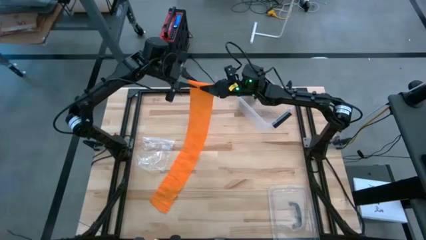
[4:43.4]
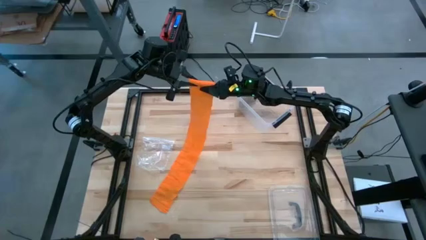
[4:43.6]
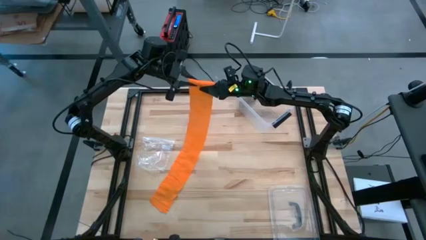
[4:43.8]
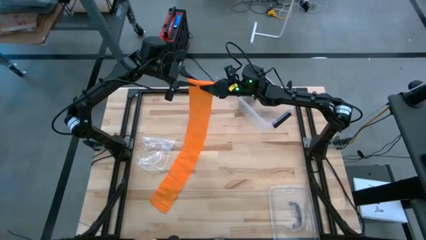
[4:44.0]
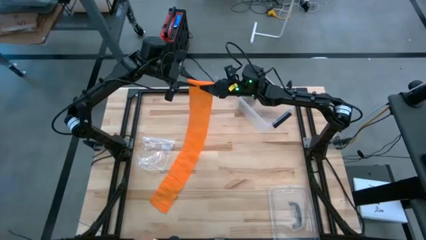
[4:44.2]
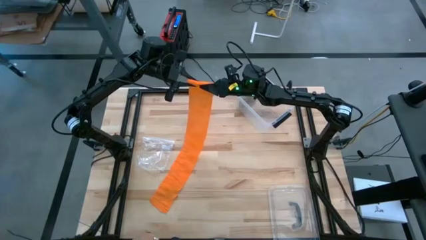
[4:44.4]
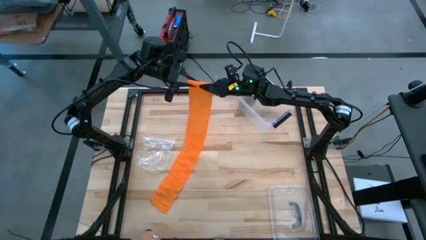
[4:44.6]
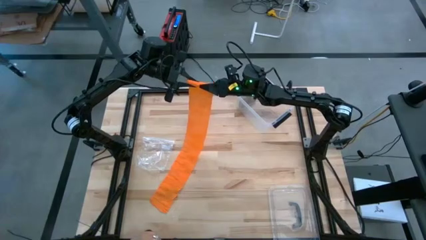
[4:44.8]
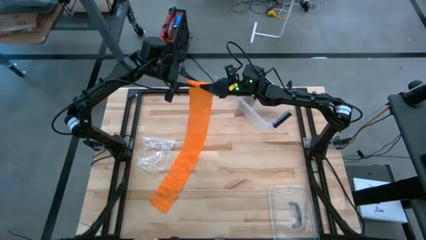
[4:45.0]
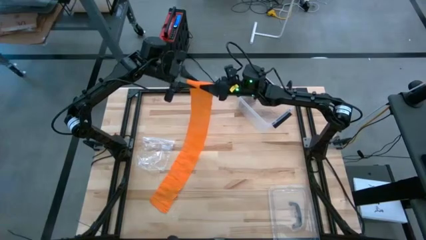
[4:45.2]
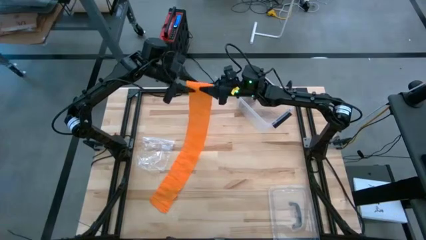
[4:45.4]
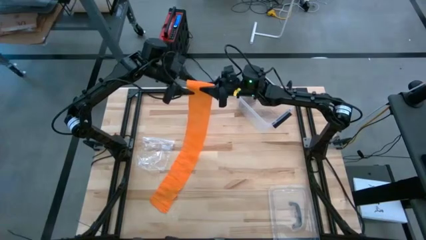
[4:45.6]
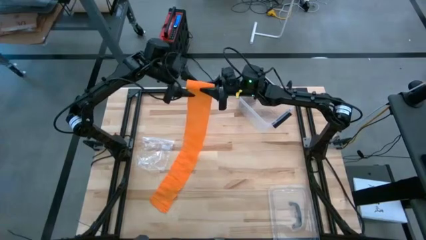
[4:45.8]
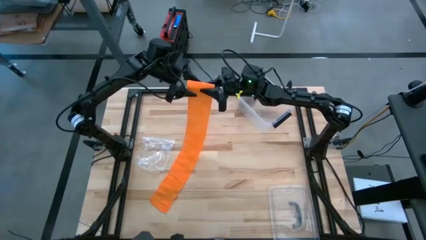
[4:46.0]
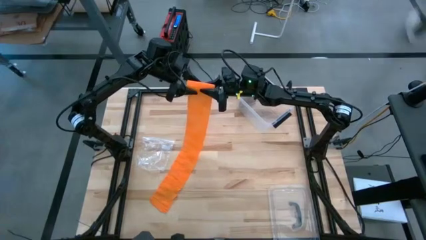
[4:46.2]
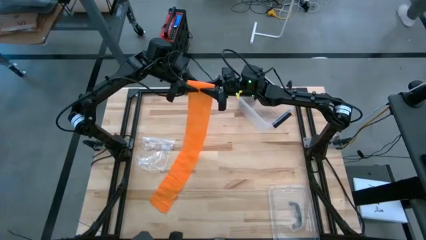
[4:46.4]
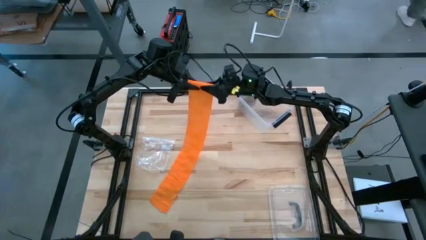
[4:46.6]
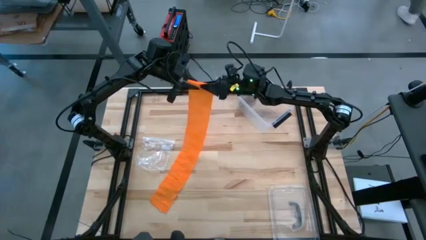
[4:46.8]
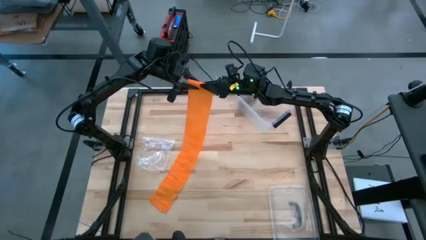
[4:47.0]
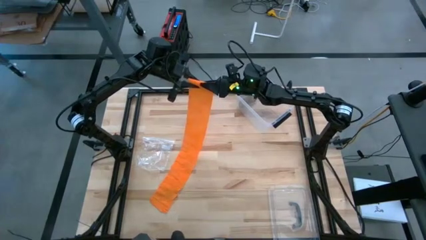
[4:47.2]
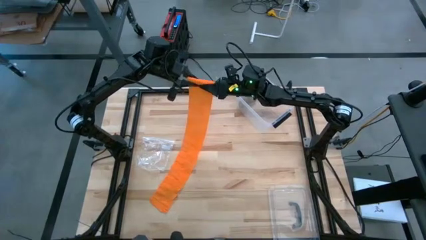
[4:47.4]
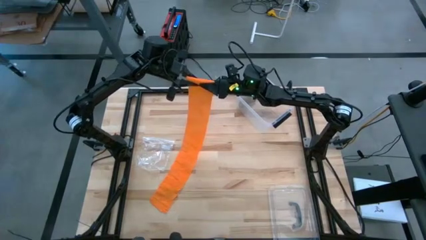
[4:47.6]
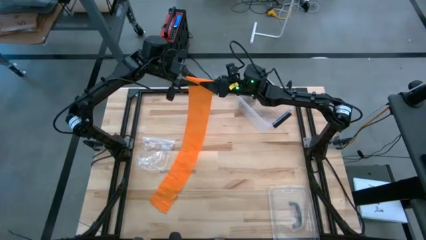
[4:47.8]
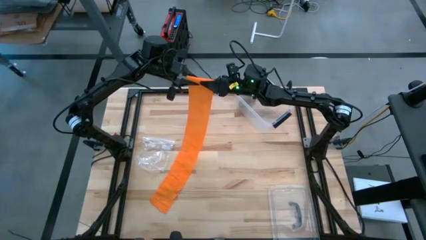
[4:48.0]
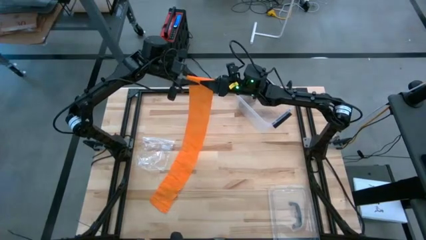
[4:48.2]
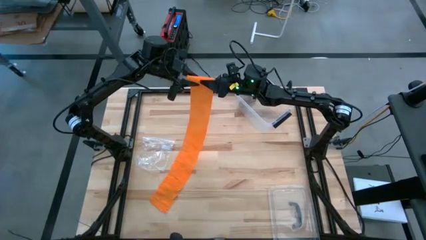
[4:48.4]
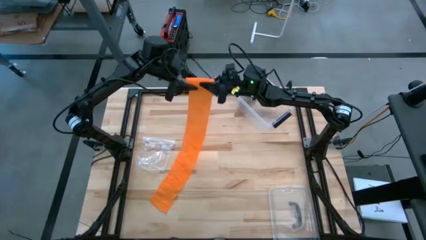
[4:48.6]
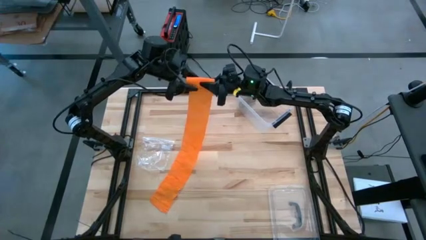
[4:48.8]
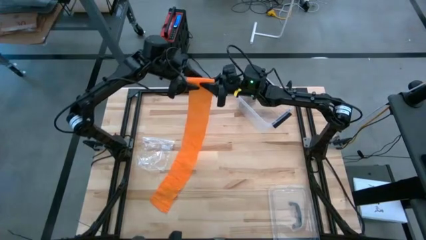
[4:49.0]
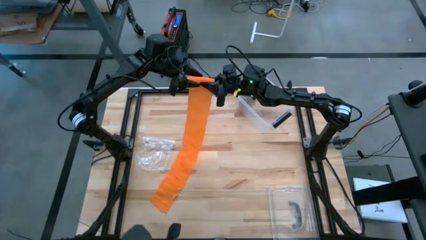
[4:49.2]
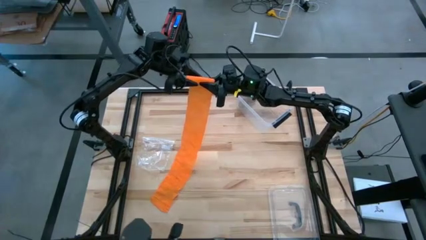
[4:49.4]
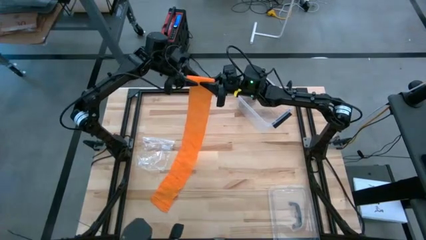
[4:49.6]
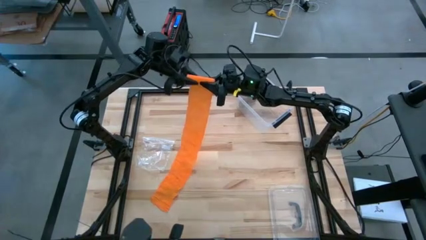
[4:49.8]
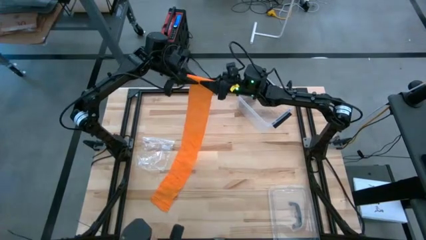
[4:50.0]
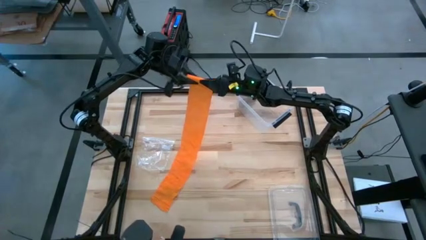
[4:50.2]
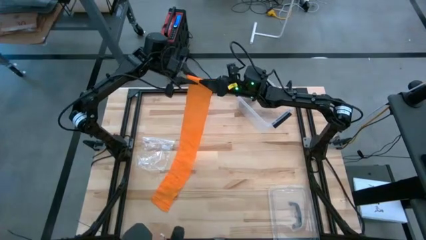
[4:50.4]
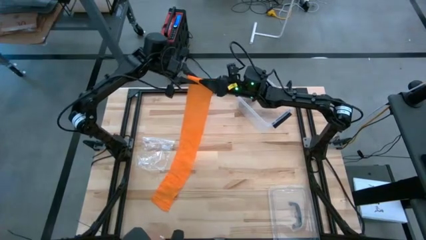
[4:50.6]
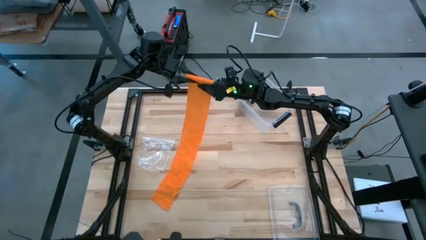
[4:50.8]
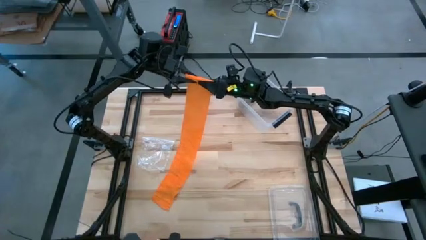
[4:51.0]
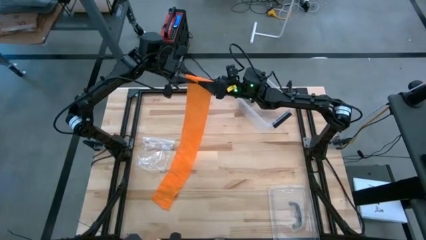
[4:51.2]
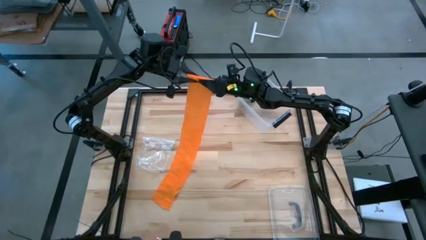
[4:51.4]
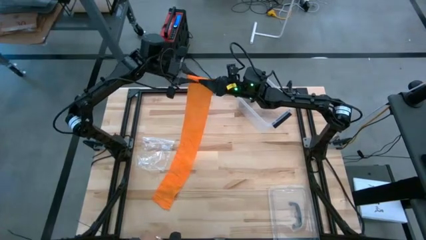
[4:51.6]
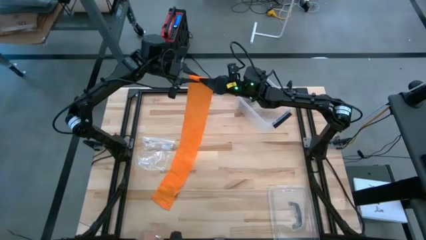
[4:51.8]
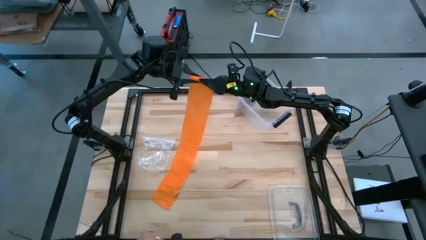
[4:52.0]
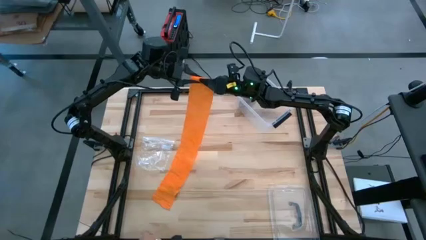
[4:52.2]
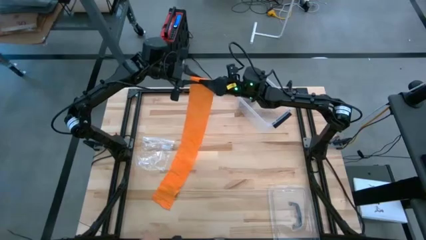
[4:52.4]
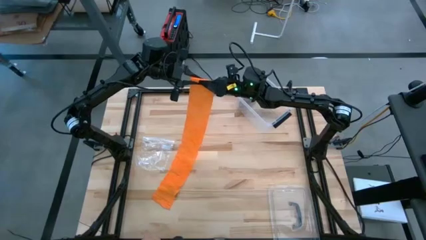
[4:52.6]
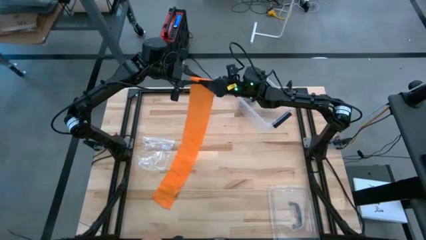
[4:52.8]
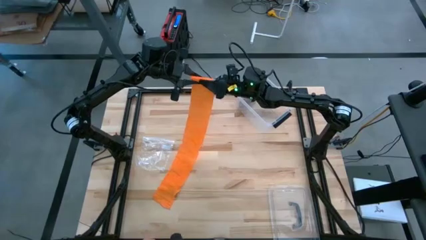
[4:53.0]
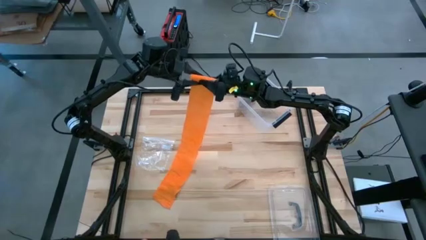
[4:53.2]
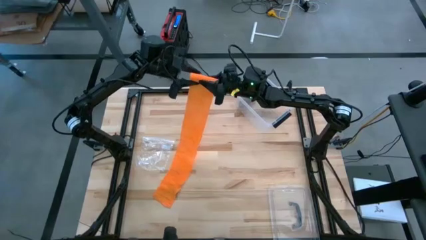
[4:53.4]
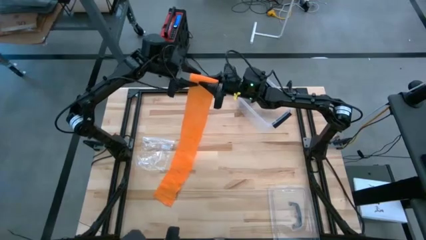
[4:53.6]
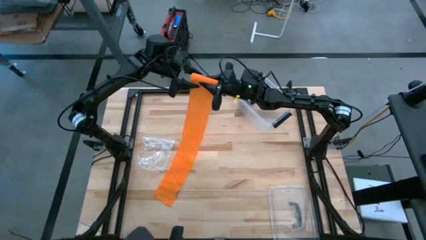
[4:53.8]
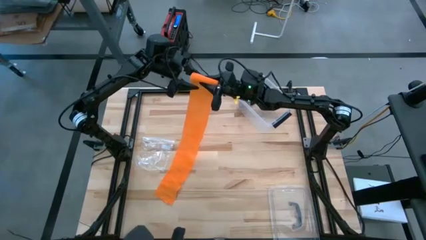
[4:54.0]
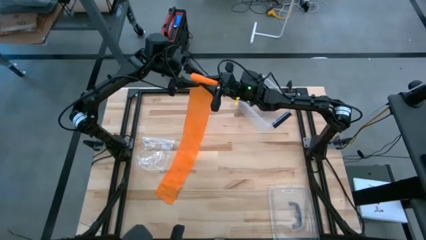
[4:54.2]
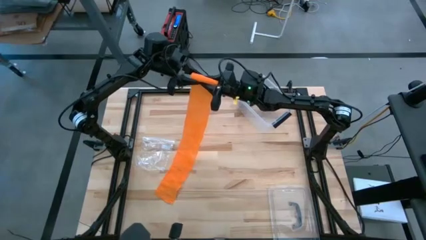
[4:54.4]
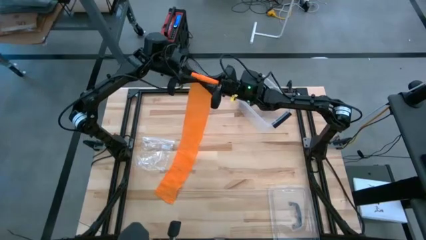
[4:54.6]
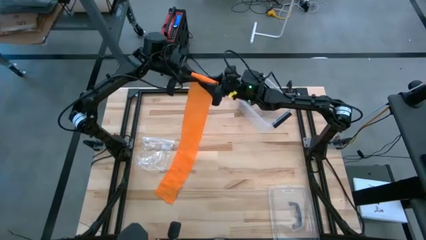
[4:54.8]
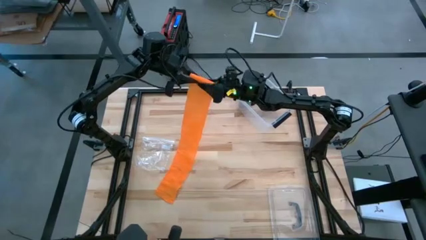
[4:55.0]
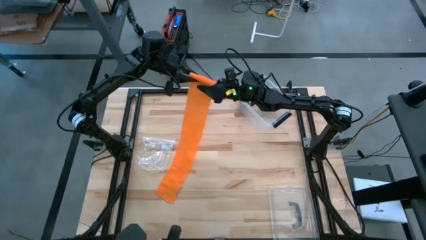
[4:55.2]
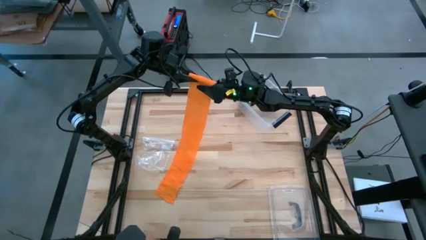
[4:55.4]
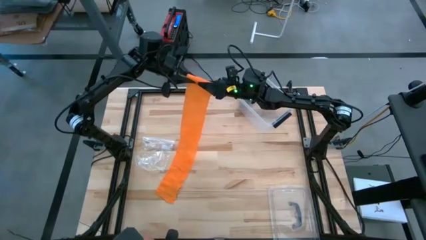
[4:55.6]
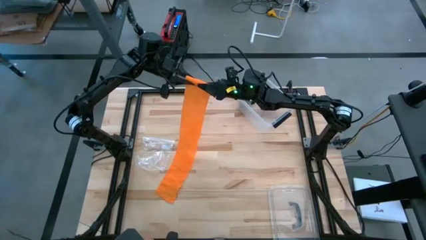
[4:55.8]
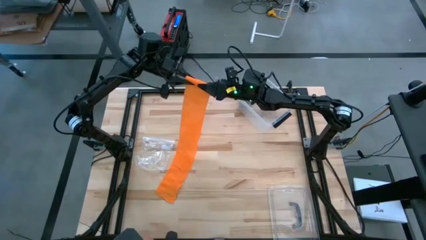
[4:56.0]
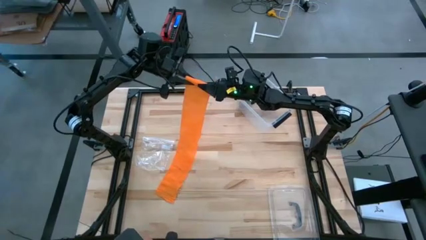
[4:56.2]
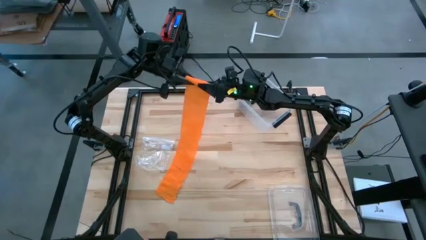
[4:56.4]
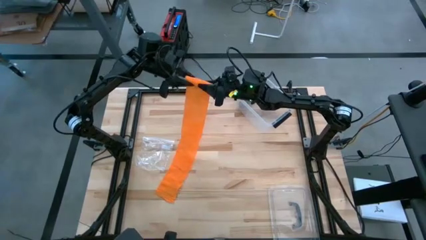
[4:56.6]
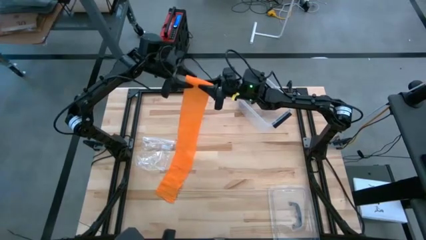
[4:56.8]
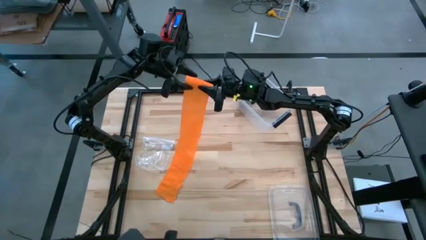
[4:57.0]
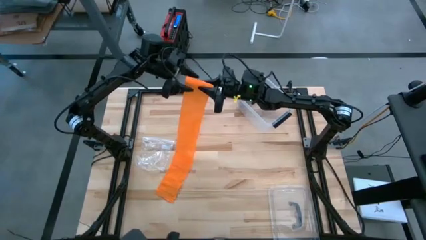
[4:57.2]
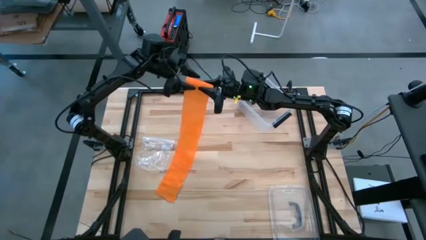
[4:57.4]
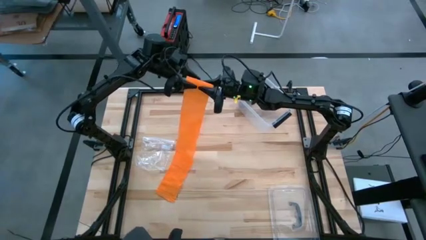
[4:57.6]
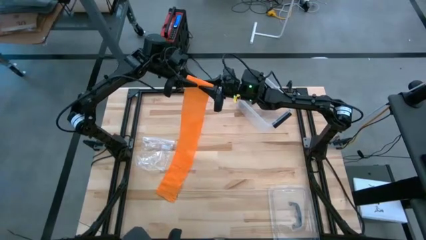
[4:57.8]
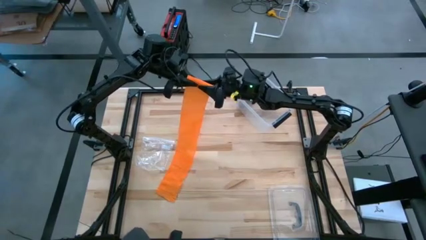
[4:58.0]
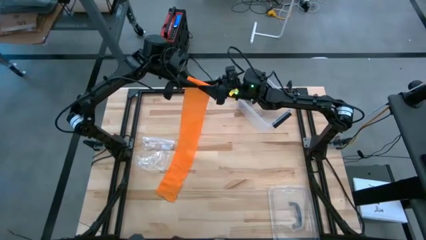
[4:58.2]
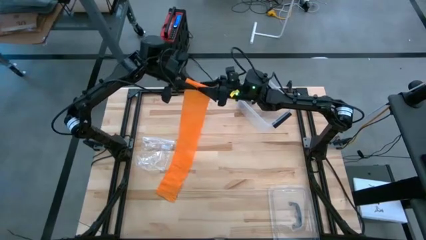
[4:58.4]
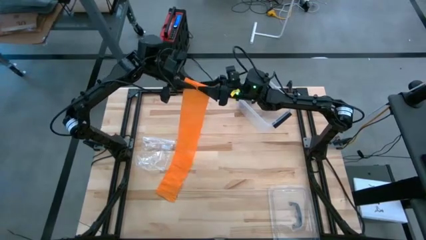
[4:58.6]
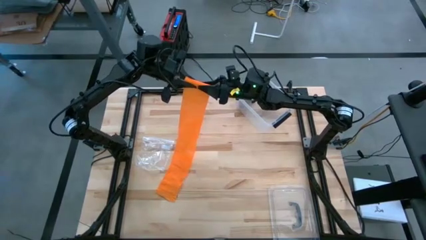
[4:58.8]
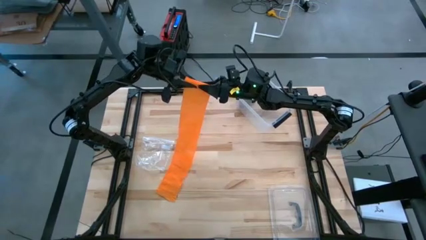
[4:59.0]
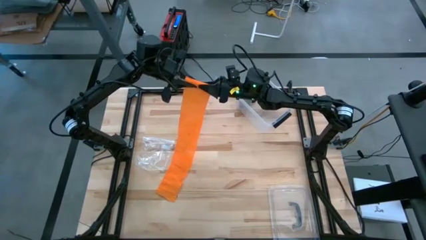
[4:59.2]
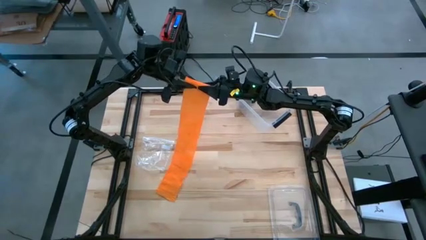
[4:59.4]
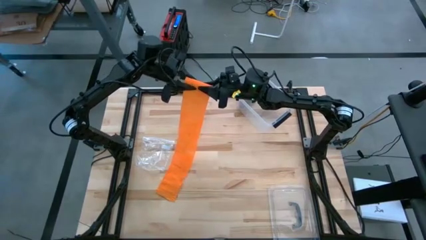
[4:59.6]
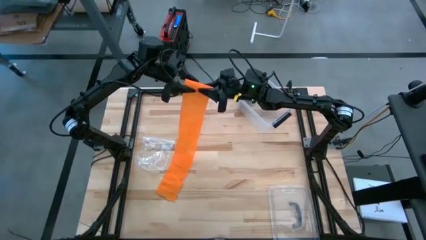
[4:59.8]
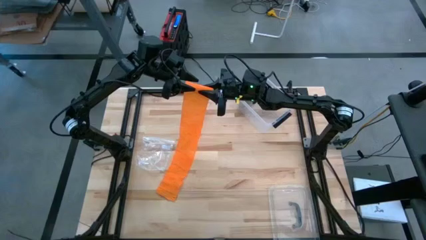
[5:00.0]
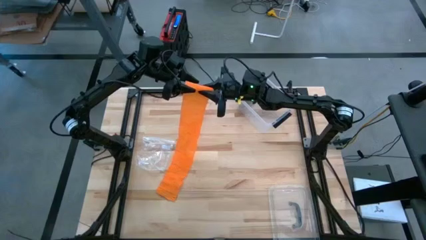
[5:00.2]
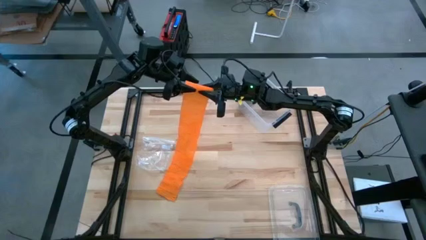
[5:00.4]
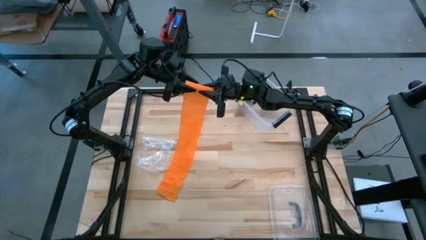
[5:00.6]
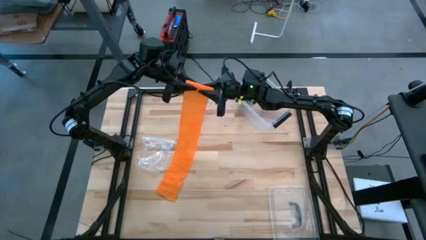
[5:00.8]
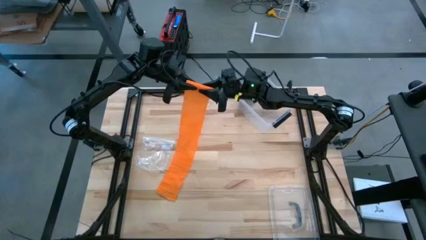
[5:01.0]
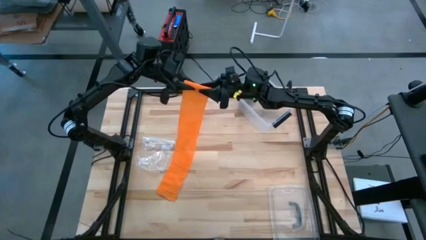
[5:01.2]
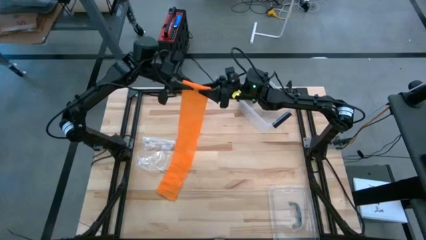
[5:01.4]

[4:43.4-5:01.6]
Task: Roll bandage
Roll the orange bandage on the table
